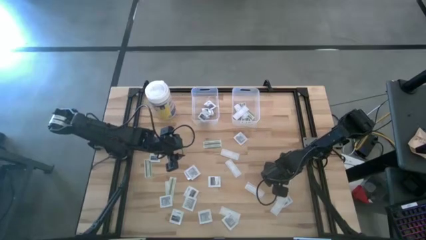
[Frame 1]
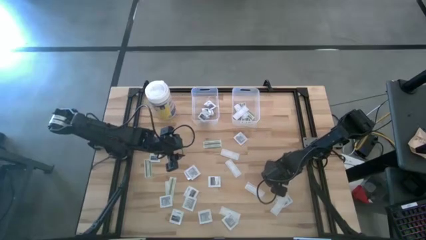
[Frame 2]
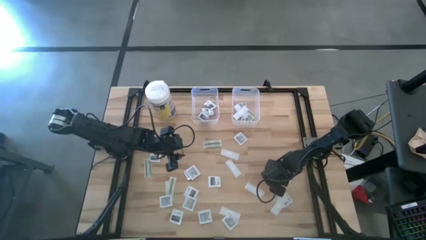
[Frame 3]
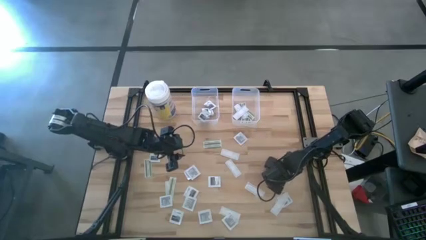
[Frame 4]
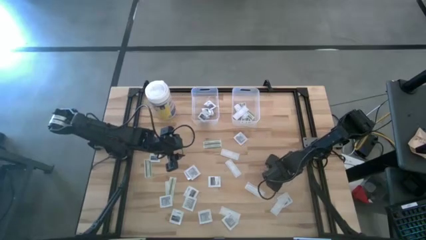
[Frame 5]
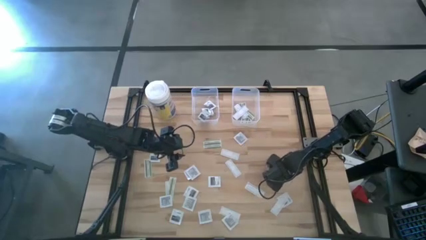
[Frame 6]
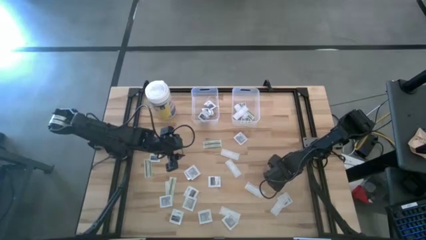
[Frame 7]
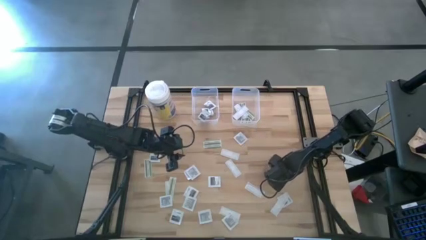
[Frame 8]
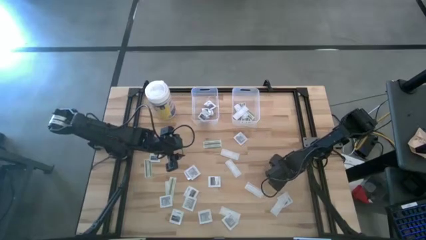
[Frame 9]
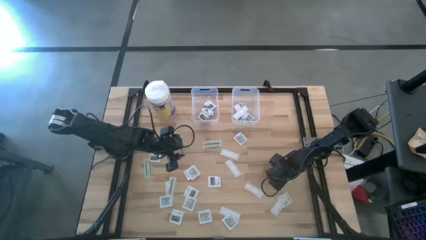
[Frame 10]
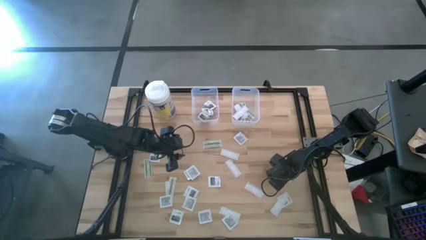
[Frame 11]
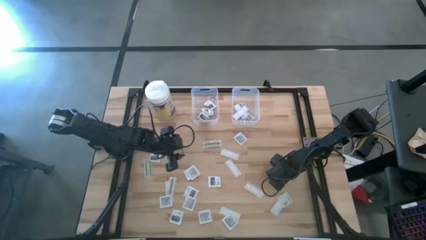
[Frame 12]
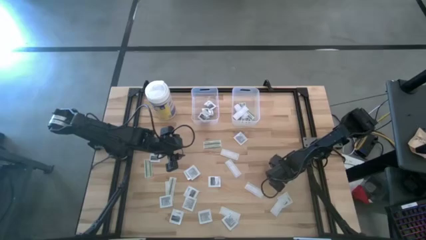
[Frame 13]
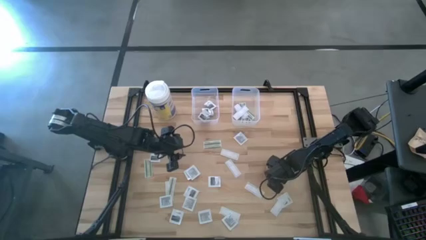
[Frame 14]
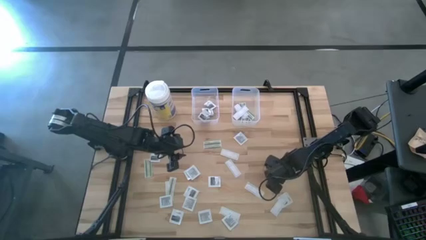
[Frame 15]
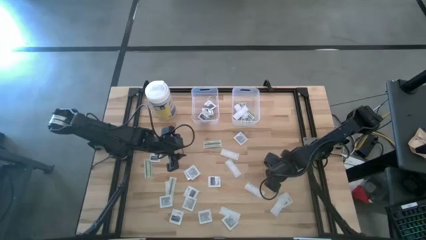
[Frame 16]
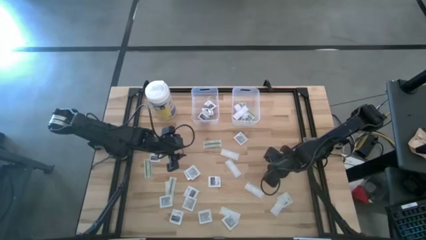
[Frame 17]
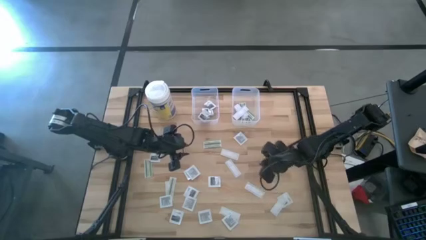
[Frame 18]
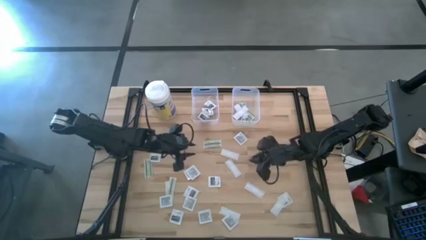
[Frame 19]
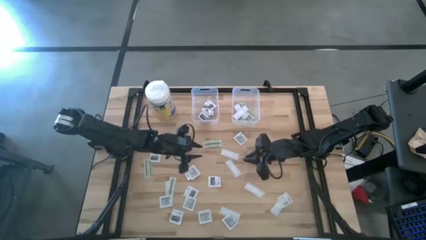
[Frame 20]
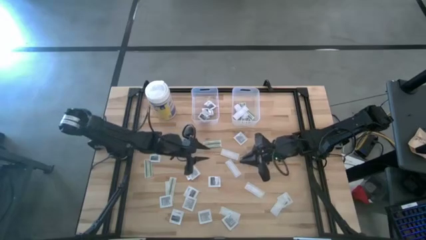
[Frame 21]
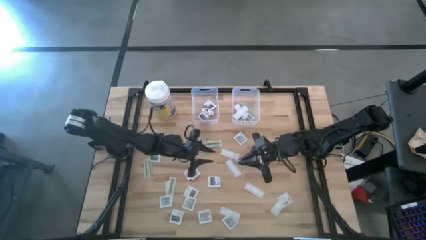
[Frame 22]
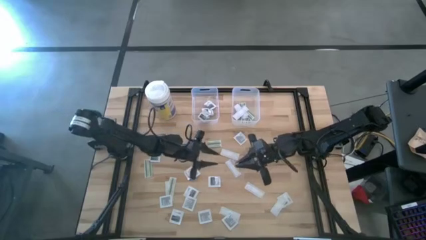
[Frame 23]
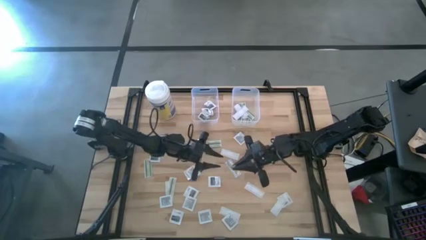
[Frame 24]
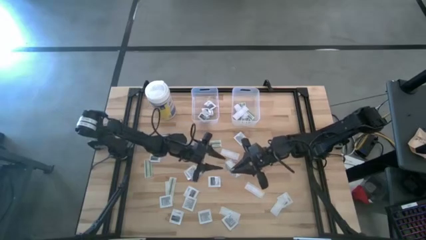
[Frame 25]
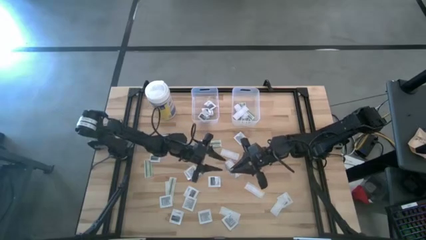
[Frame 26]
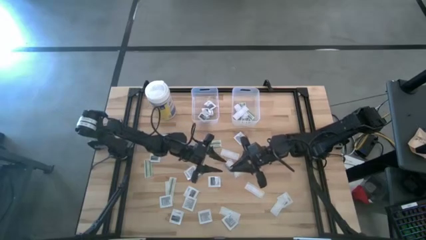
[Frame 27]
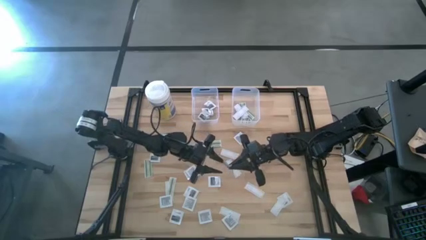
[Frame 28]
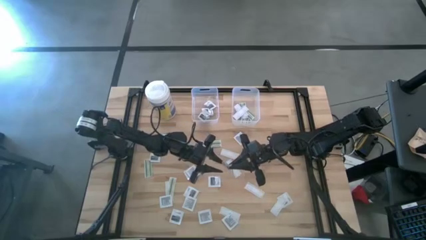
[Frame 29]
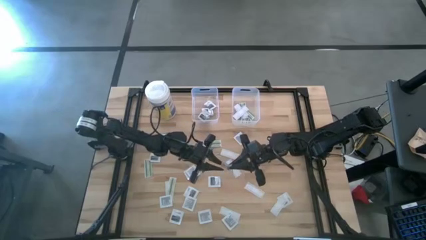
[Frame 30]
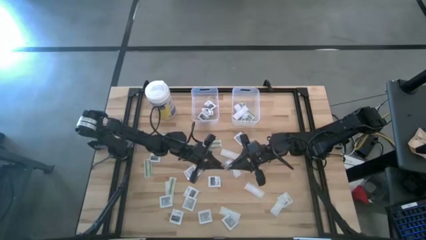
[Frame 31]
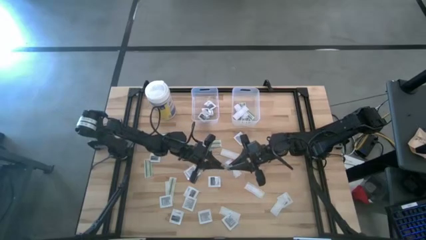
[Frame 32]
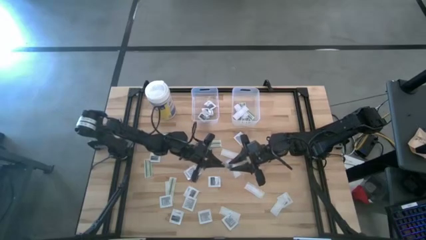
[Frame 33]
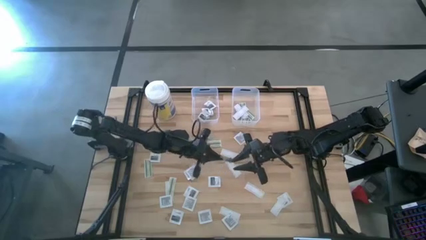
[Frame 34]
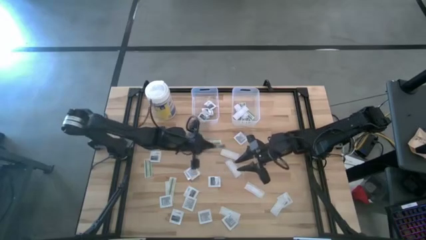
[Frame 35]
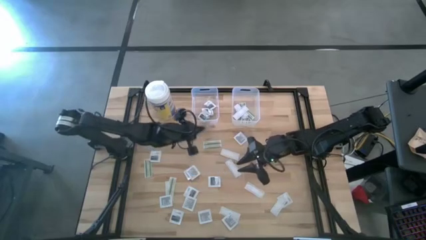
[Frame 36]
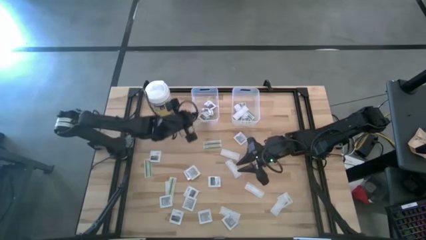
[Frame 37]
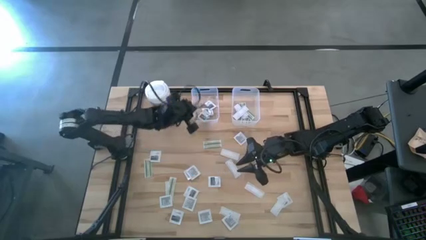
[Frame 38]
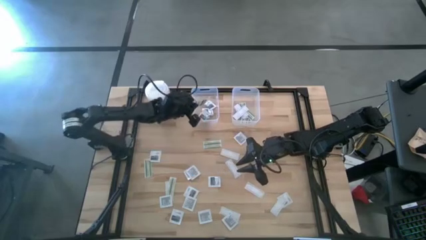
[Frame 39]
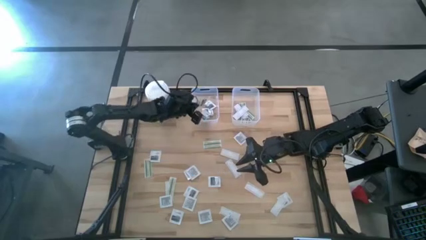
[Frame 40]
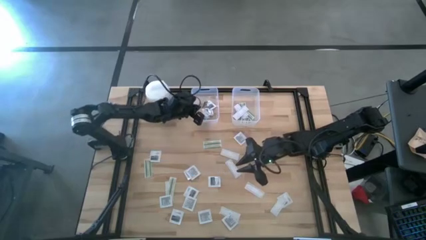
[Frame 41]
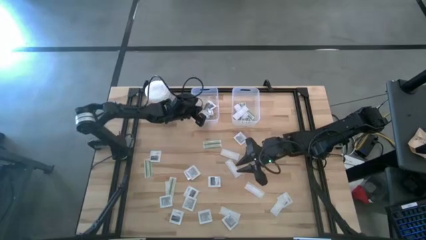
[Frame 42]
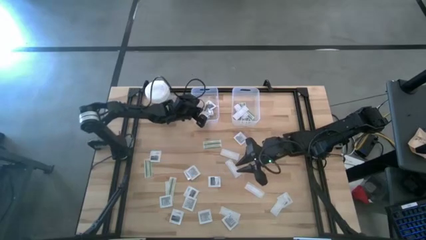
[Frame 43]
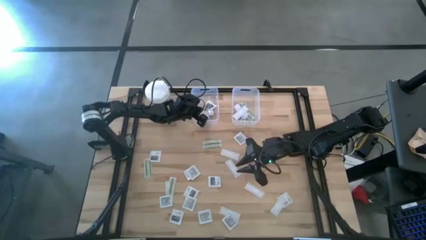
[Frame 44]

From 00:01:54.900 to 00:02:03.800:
Task: Pick & Place First Aid Supplies
Put the towelette pack into the left transparent bin

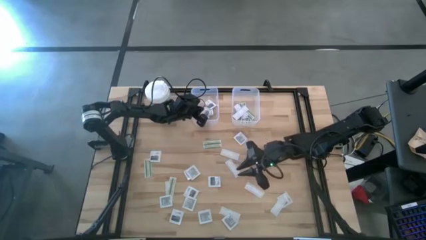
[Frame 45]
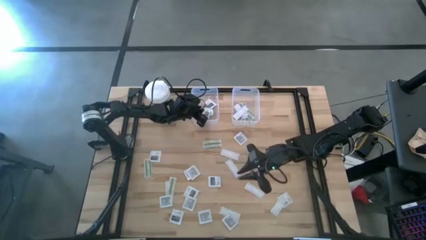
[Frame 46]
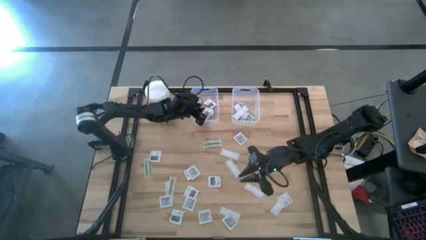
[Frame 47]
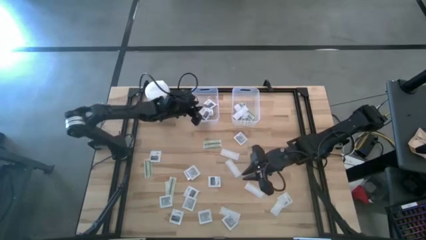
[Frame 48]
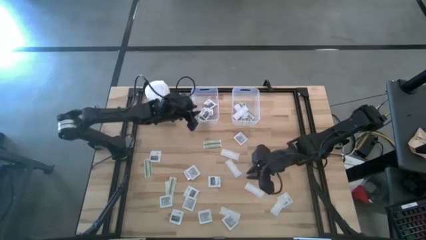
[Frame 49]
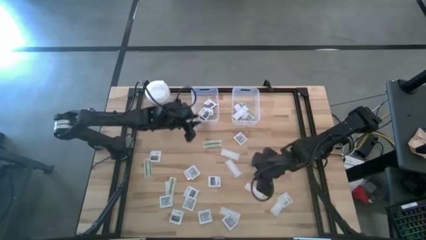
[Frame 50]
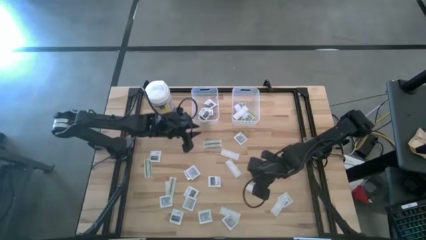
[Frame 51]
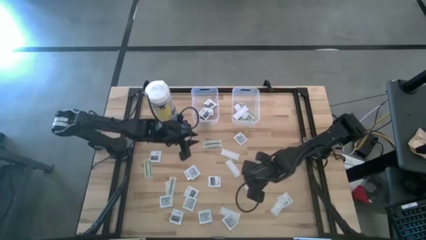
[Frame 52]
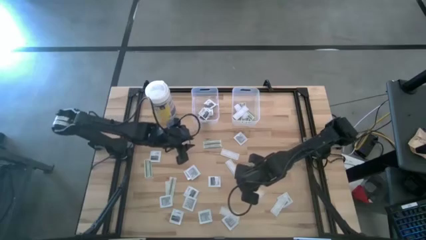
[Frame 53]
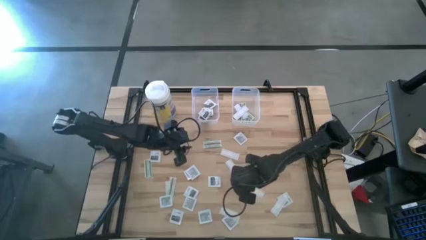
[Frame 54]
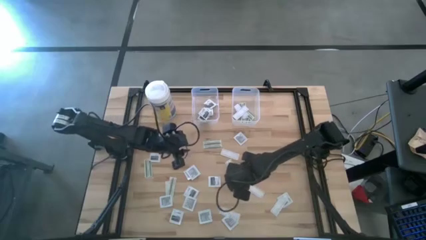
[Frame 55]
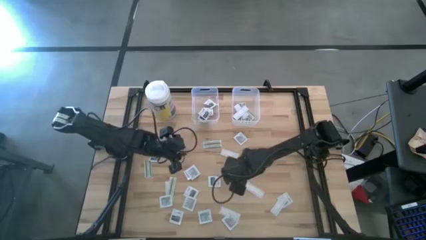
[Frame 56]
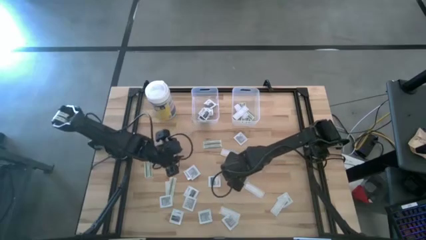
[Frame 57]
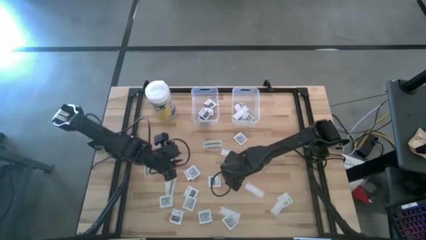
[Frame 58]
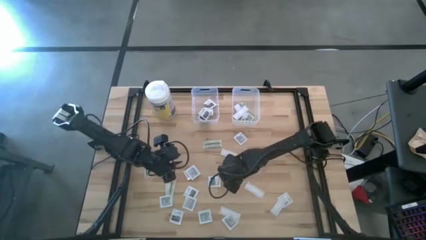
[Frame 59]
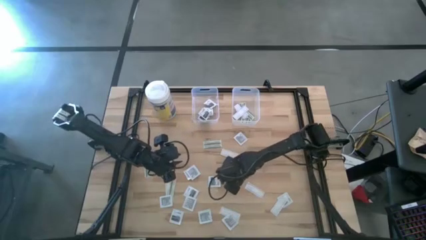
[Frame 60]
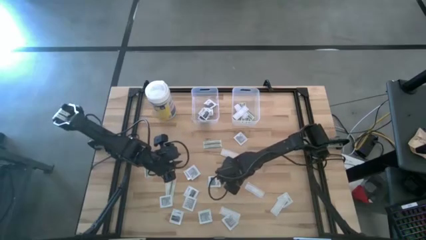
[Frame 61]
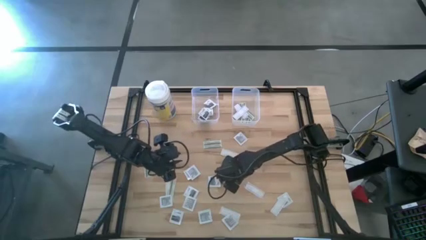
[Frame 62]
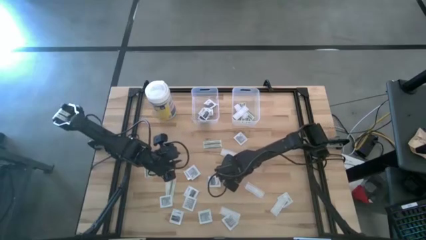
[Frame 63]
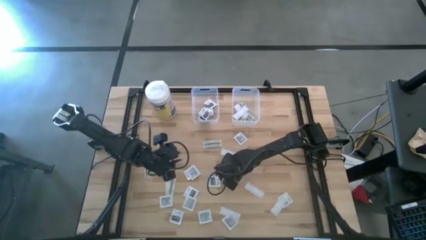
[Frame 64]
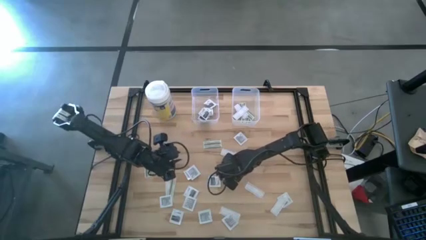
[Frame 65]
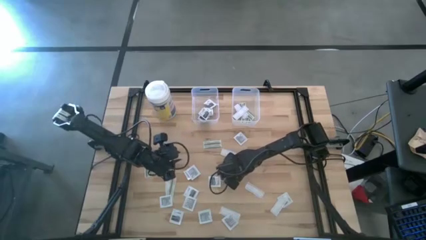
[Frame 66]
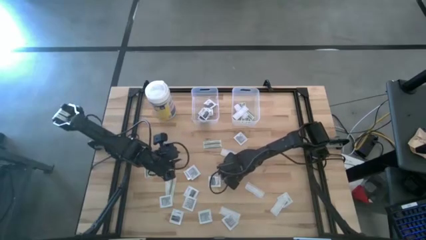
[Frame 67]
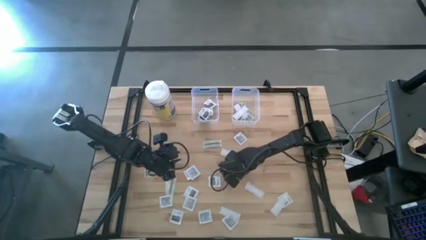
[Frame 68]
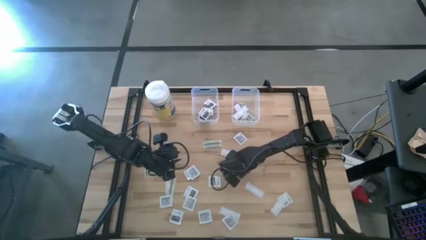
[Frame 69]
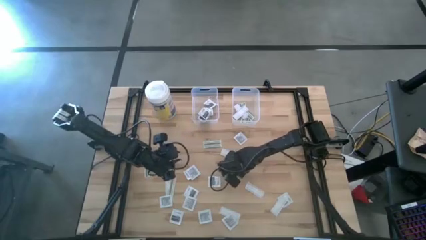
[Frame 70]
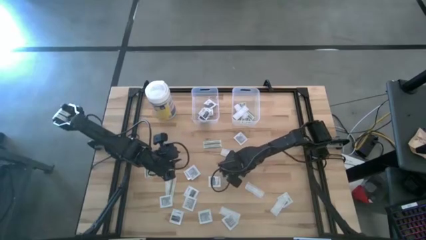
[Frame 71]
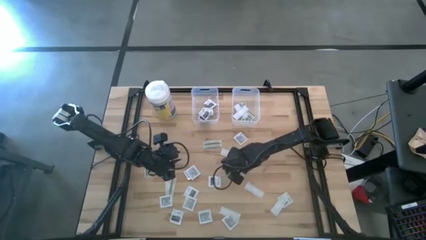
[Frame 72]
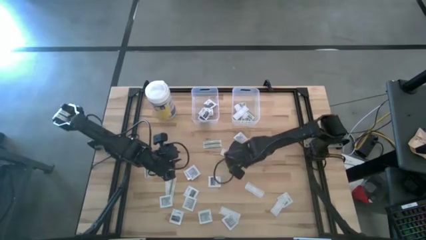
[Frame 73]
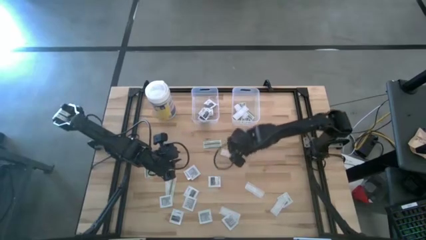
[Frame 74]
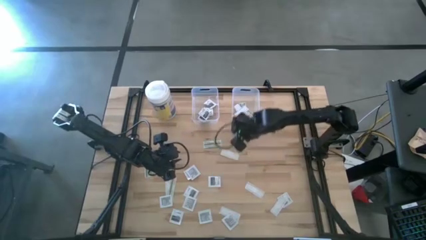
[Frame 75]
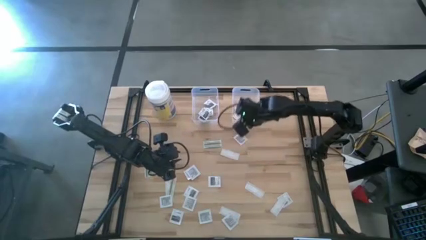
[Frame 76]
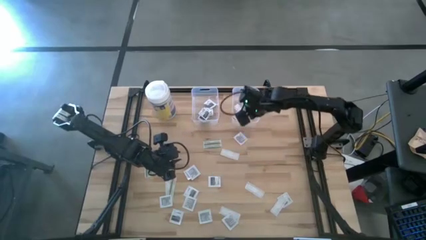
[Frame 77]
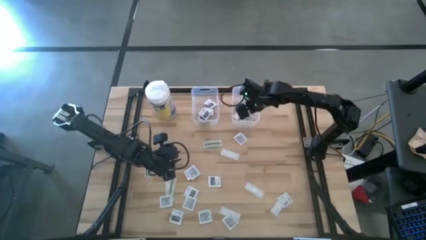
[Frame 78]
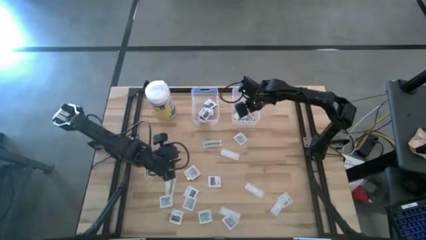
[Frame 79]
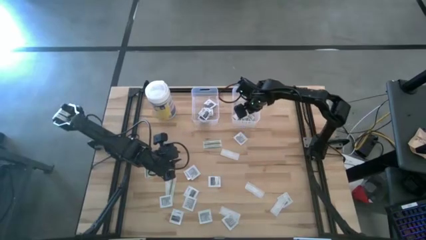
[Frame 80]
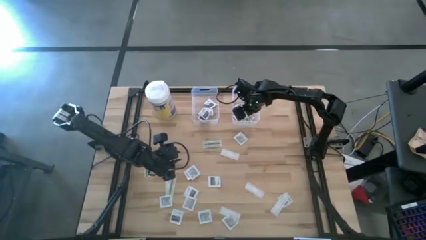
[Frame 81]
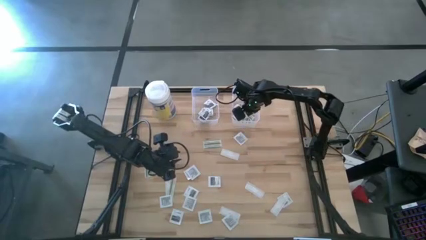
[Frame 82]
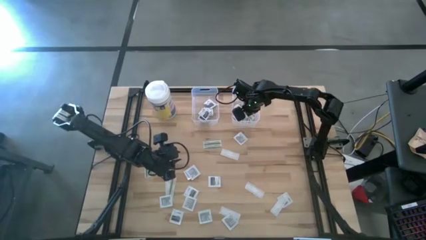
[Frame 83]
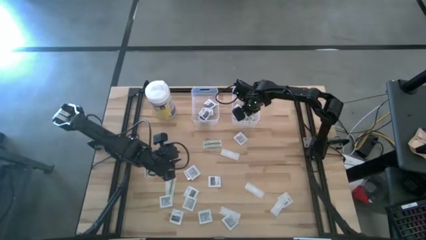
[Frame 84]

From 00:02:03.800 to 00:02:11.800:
Put the bandage into the right transparent bin
